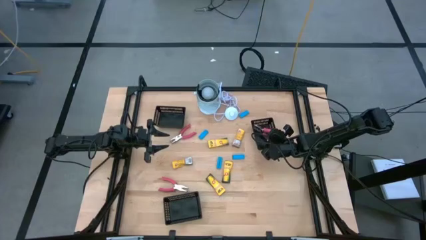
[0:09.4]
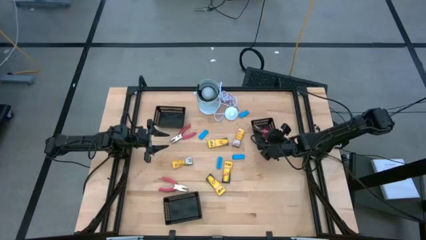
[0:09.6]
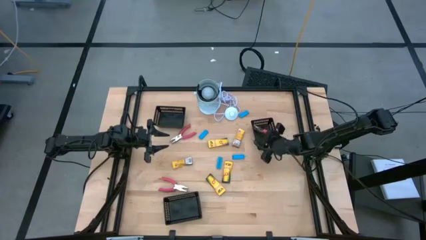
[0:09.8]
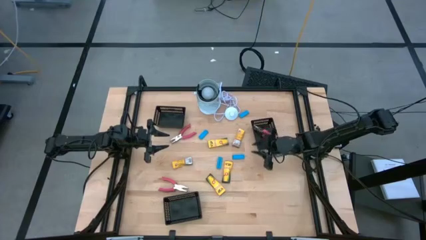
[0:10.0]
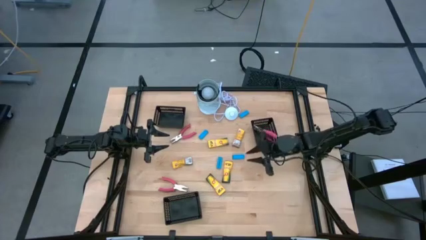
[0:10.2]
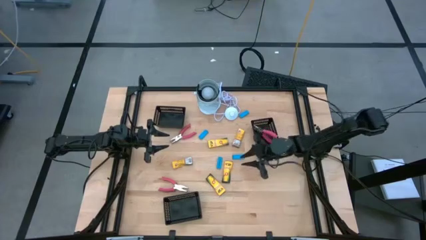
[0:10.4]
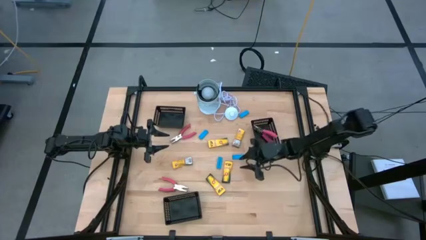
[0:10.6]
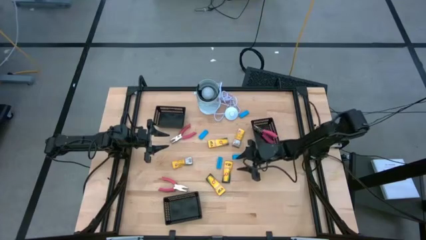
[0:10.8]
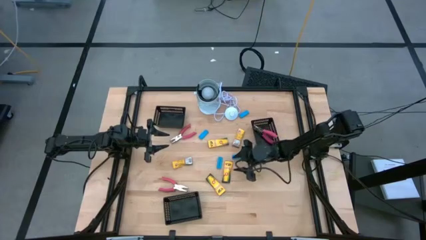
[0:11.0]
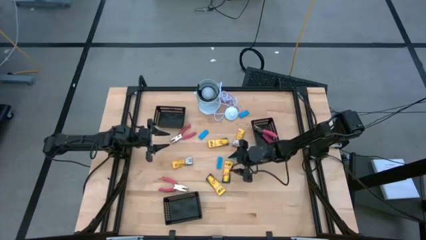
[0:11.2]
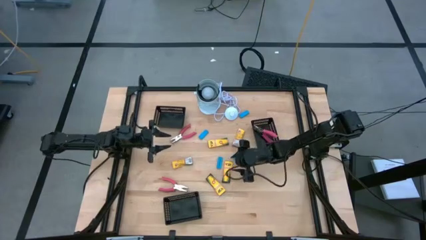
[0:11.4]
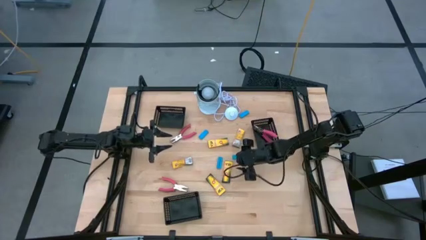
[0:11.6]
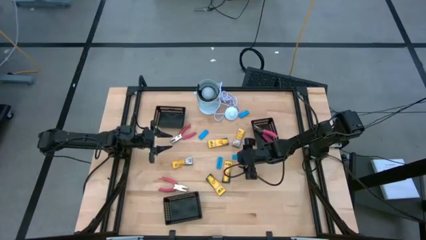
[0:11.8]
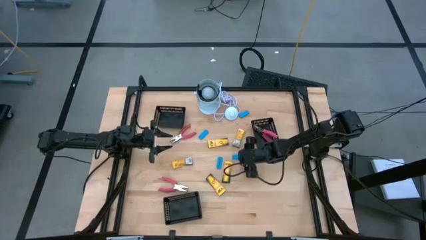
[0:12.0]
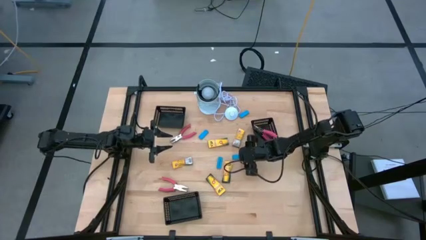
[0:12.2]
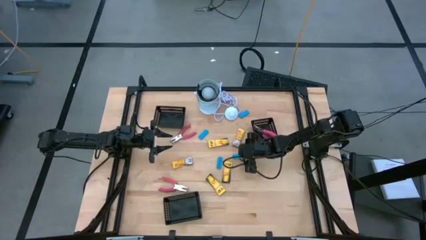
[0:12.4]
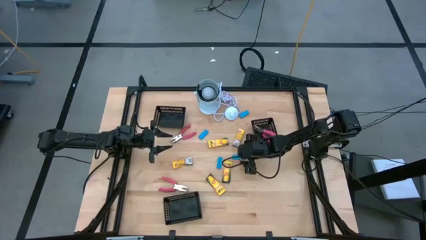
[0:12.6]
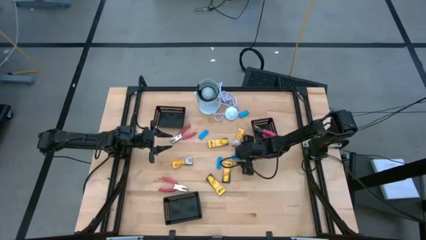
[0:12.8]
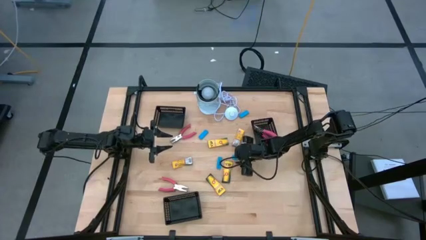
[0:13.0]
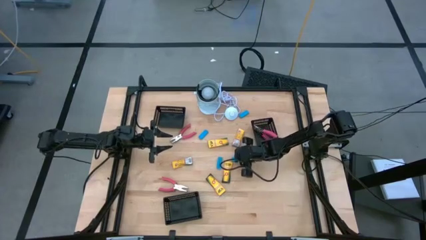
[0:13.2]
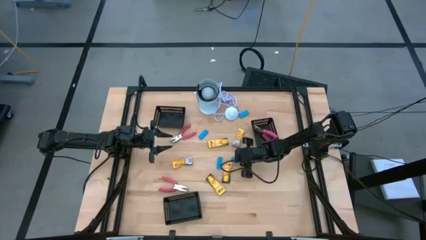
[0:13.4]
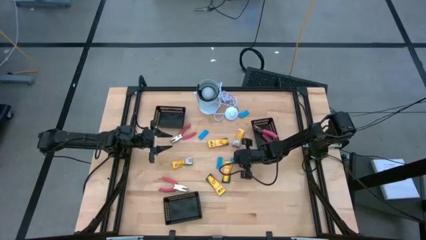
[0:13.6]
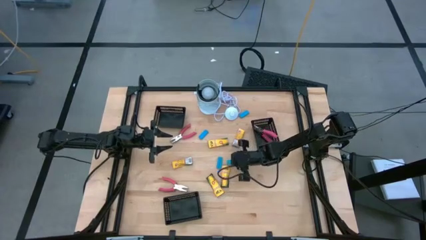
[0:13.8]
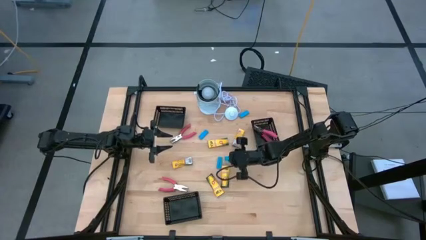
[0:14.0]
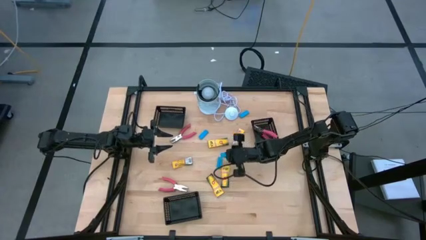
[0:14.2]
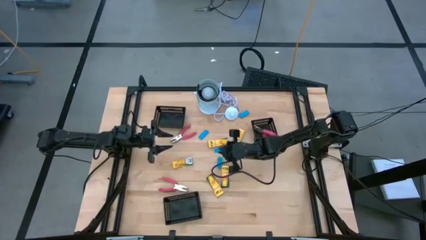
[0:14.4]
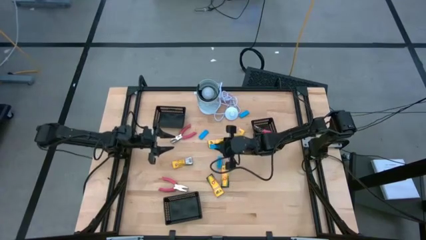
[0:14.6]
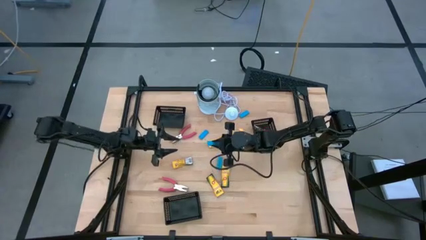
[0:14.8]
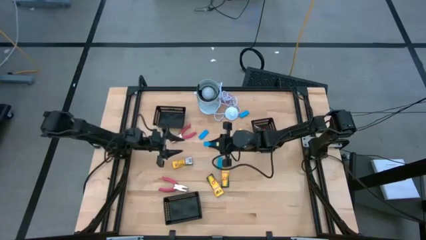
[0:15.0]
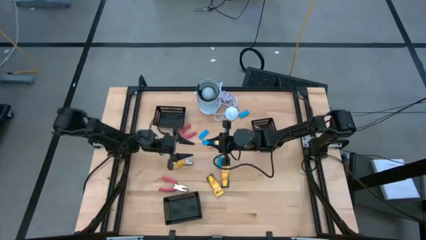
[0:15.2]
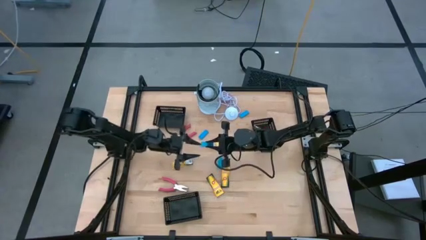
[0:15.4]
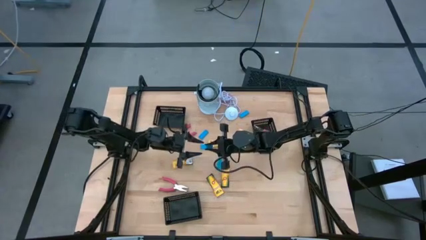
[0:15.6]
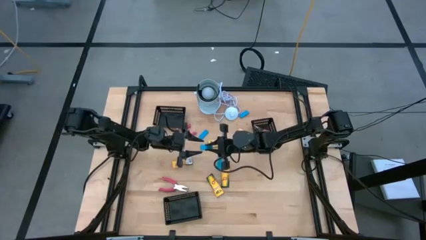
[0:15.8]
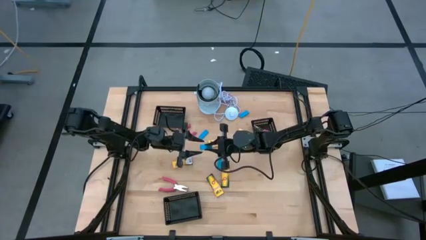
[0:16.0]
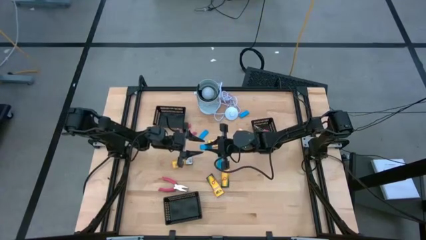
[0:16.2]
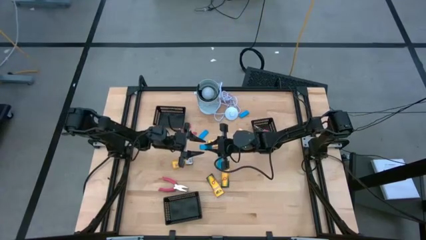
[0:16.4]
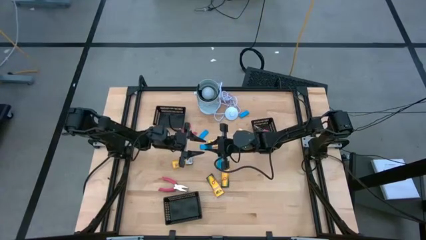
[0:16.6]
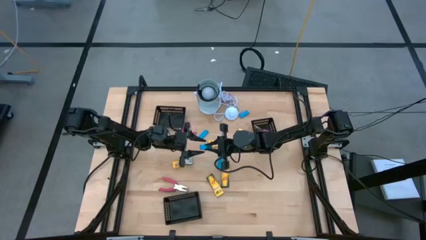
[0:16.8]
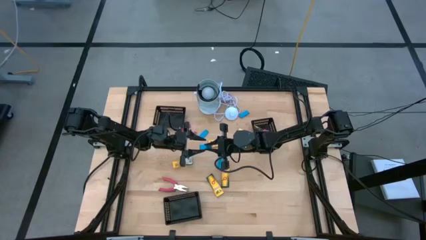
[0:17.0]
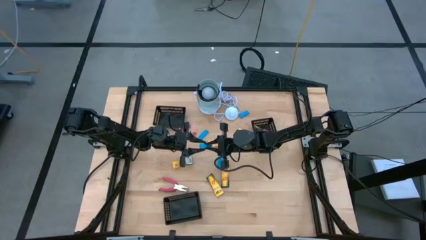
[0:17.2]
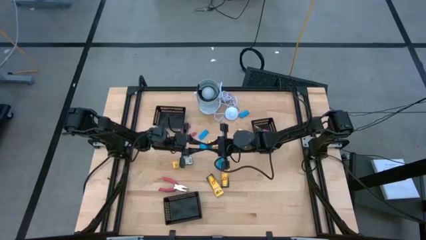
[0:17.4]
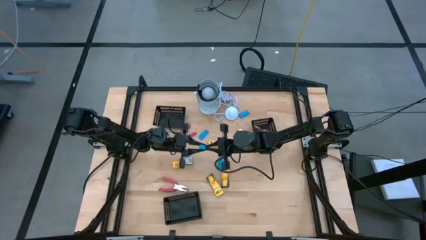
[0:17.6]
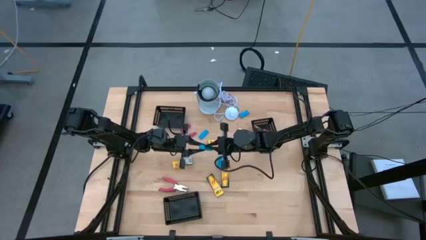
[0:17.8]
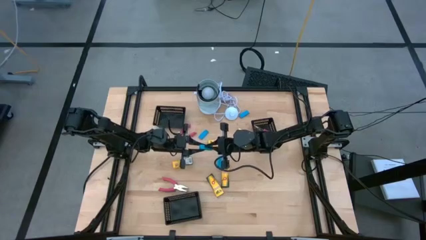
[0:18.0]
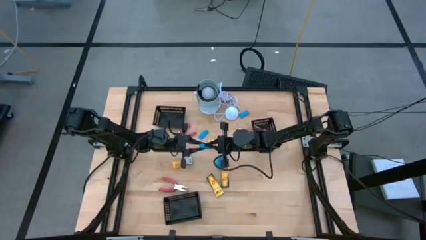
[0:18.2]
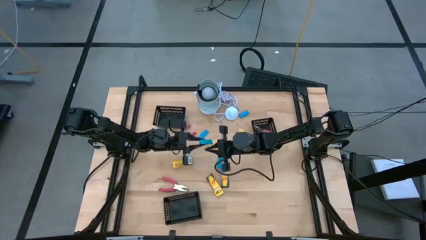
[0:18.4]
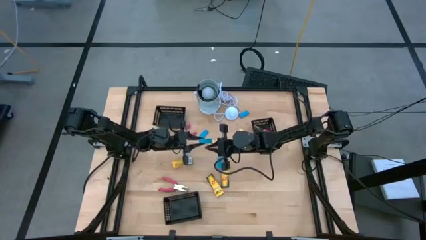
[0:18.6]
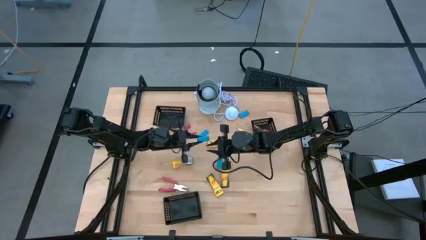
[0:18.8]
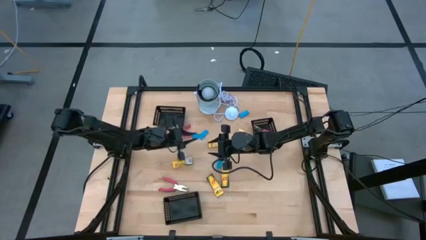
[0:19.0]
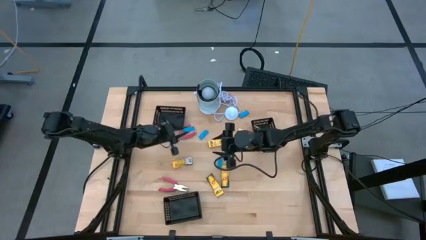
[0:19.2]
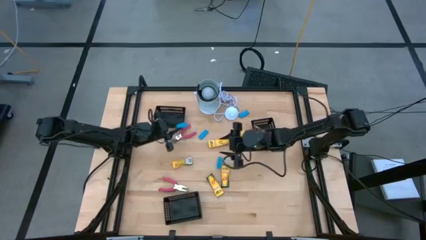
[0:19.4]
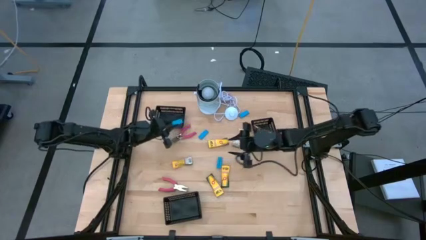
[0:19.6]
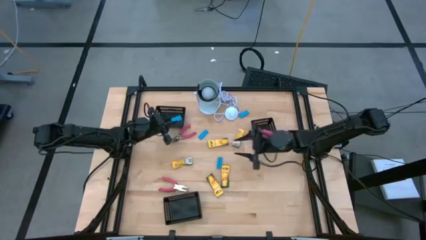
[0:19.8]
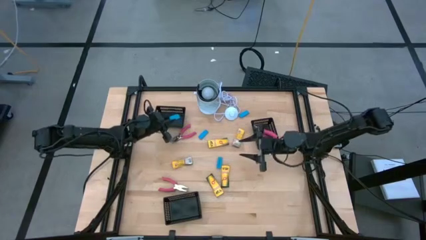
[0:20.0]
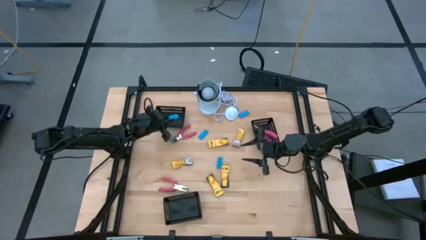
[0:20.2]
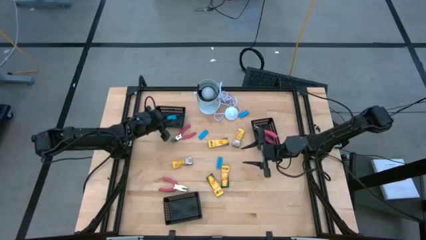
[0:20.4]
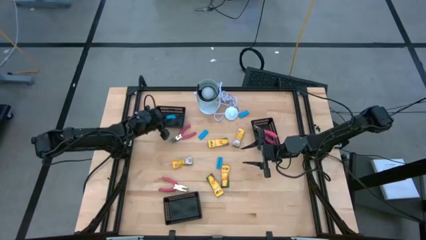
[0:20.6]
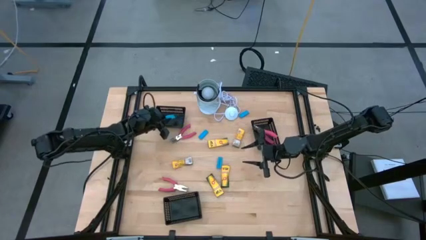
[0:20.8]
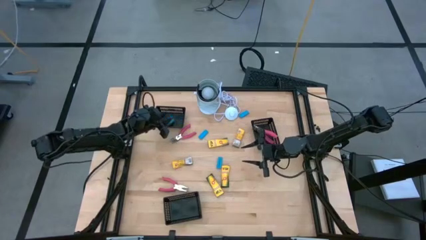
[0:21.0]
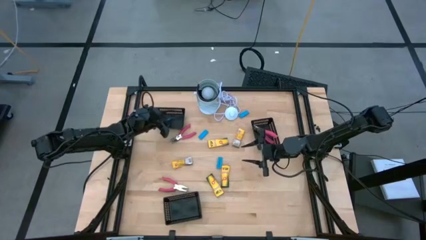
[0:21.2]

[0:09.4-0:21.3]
Task: Pick & Place School Supplies
Put the blue eraser into the top black bin
